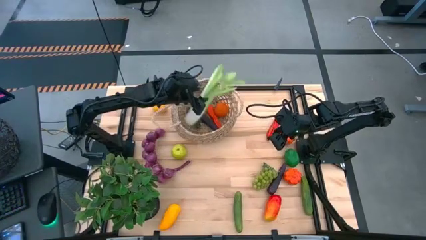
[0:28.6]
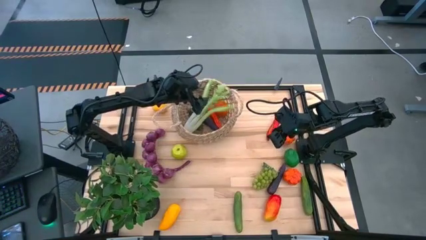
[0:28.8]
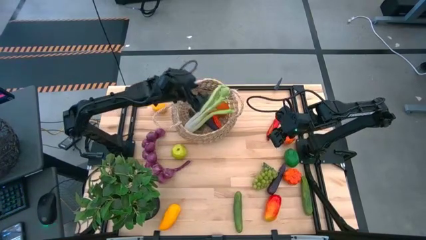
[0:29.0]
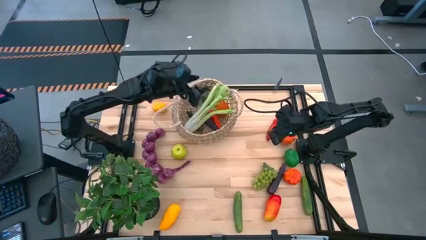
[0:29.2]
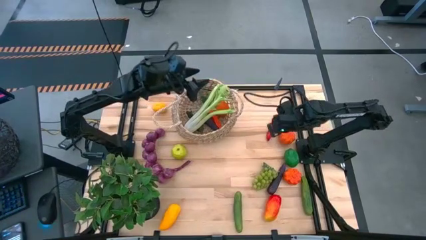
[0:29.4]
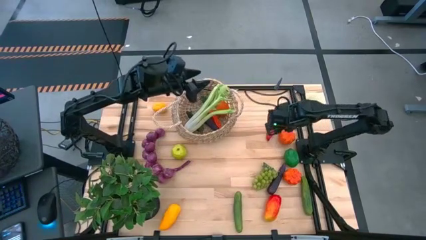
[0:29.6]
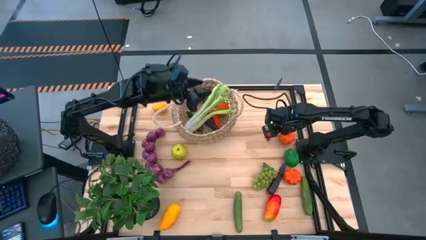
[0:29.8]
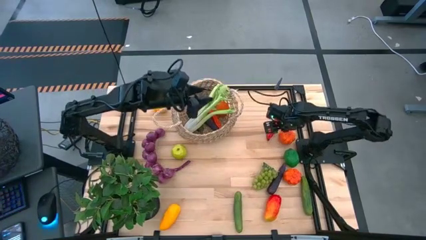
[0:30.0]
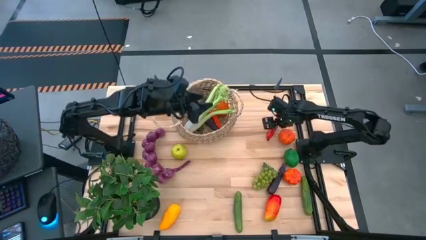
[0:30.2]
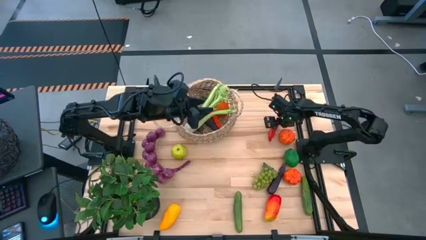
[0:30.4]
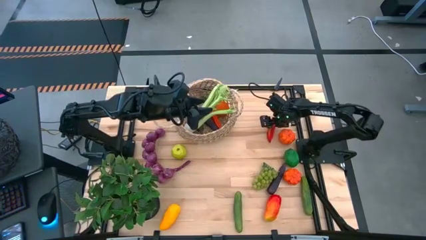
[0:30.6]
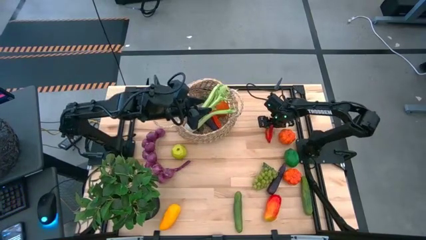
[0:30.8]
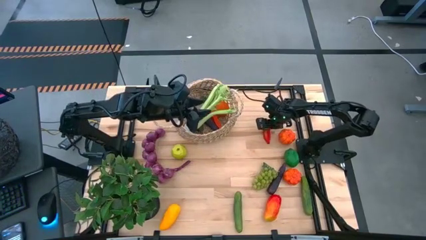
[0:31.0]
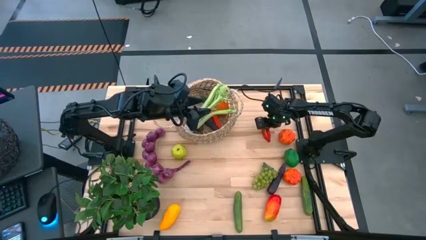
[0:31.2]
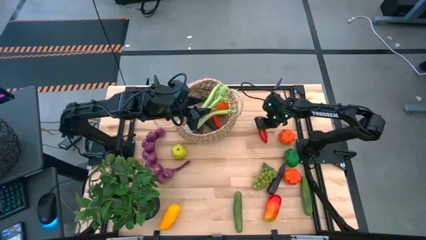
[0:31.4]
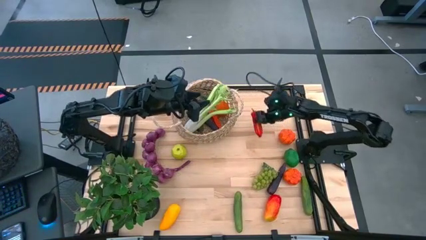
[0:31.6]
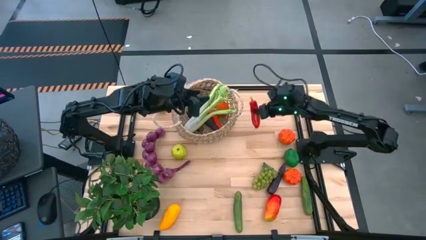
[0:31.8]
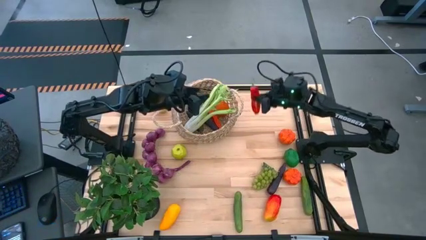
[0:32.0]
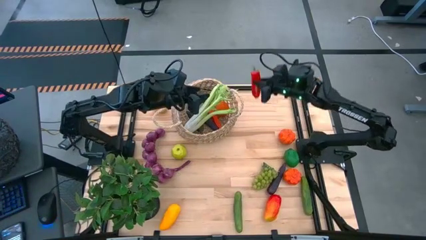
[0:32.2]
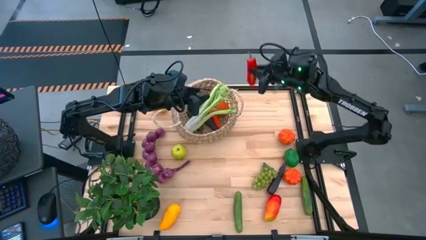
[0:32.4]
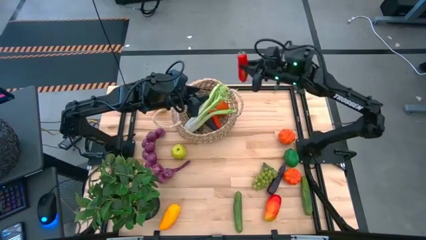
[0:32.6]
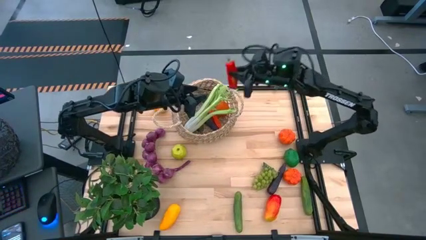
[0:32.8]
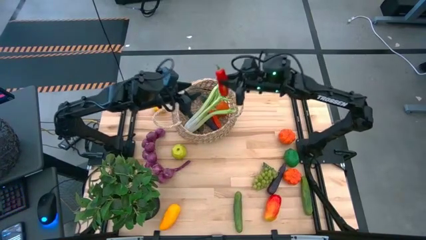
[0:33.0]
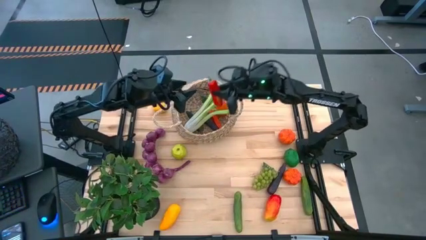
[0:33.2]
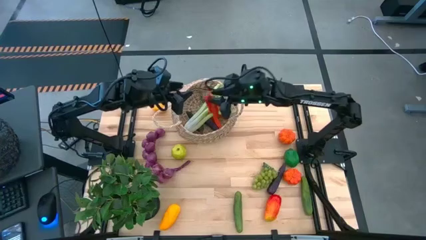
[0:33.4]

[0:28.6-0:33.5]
Task: Build produce basket
Put the red chili pepper into the brown basket

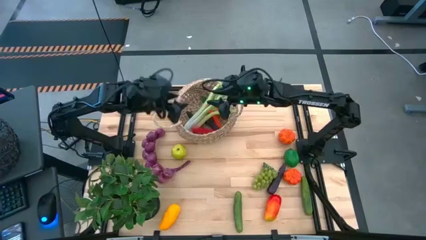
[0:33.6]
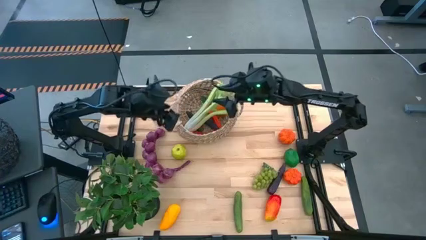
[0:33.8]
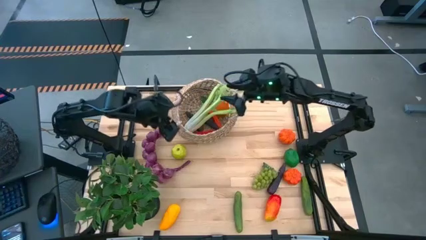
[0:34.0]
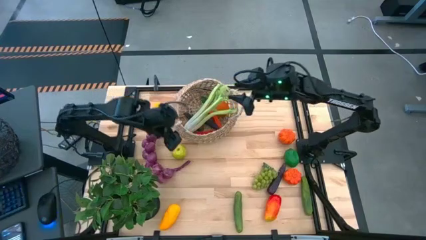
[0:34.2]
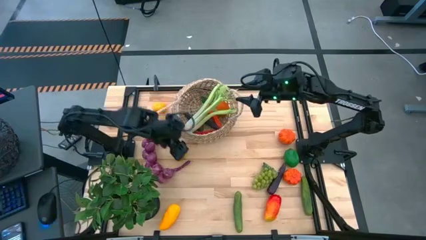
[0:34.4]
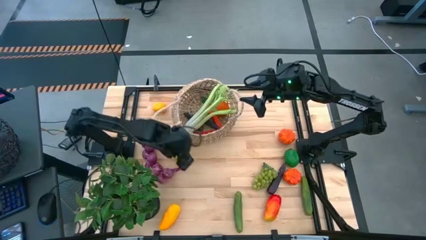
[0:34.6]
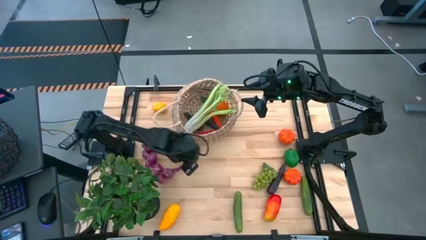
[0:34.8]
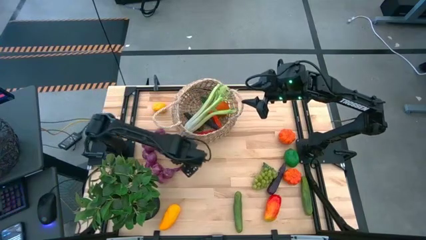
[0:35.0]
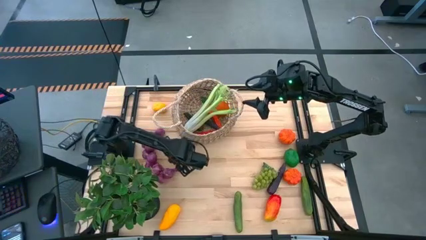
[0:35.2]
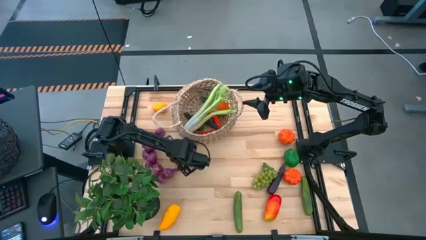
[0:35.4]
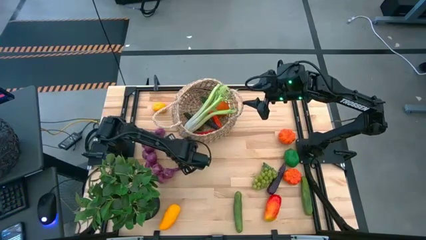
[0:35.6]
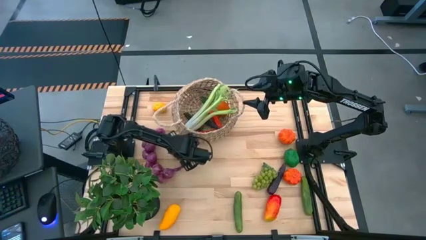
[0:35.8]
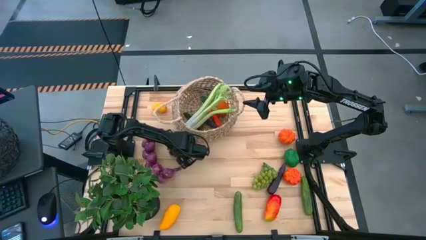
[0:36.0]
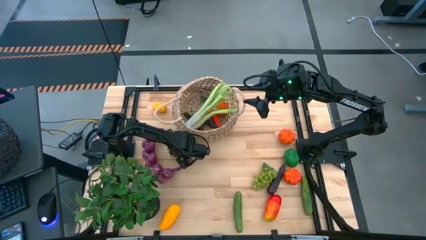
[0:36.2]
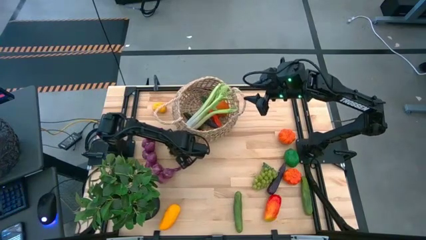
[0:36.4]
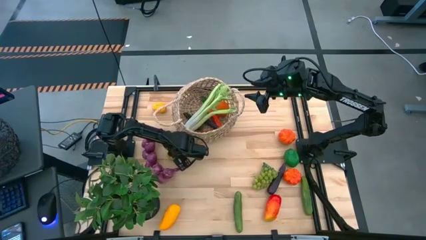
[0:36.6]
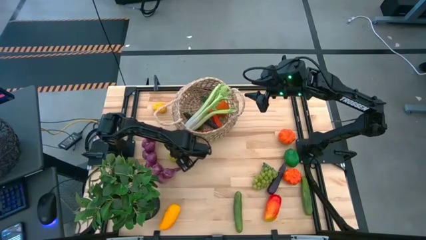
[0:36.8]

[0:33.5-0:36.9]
Put the green apple into the brown basket

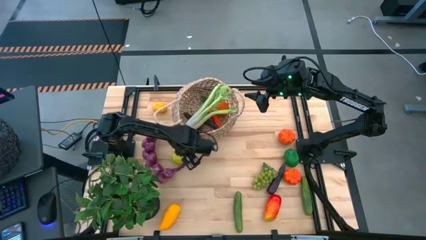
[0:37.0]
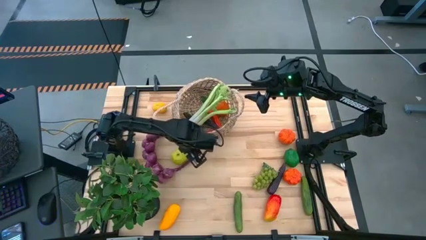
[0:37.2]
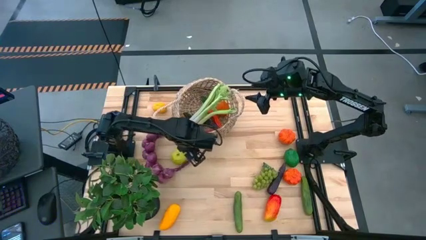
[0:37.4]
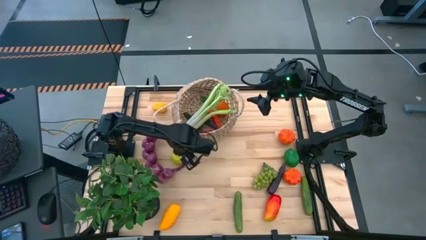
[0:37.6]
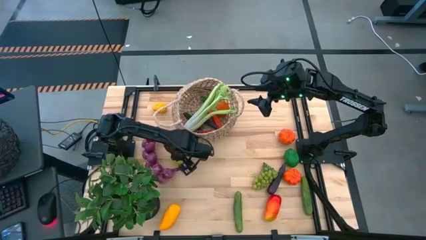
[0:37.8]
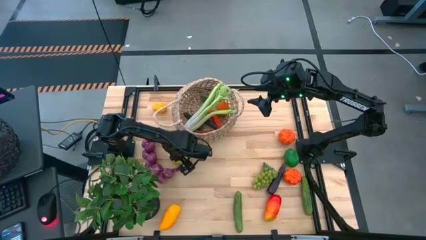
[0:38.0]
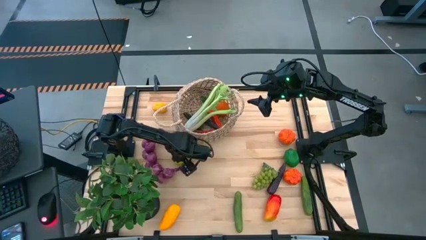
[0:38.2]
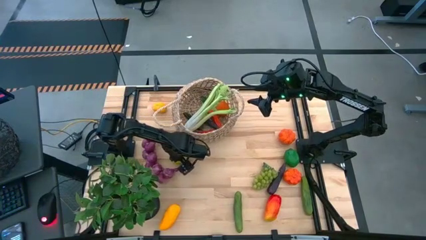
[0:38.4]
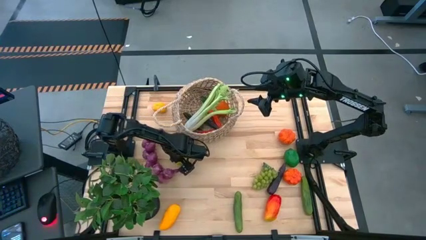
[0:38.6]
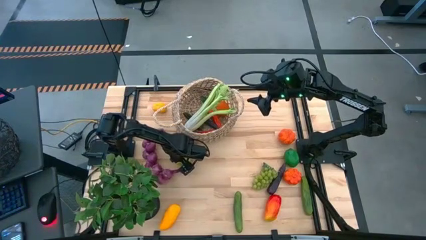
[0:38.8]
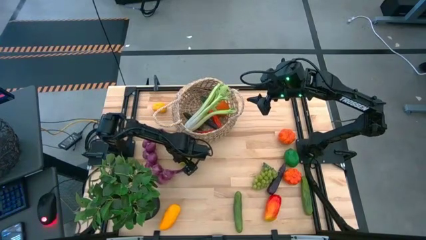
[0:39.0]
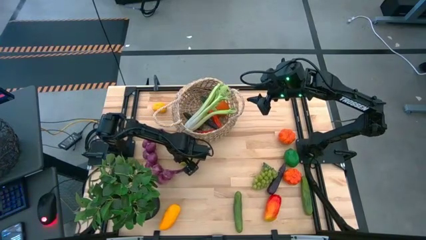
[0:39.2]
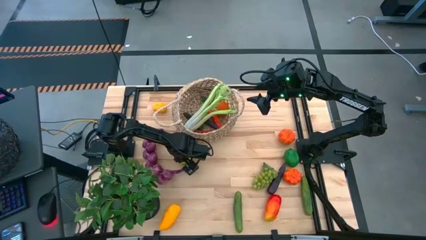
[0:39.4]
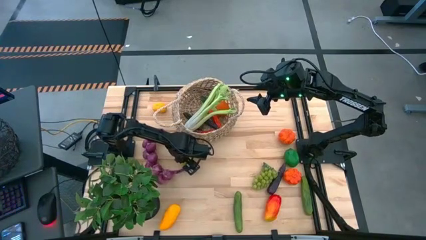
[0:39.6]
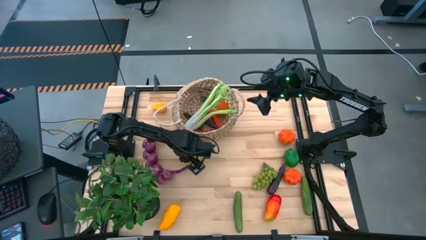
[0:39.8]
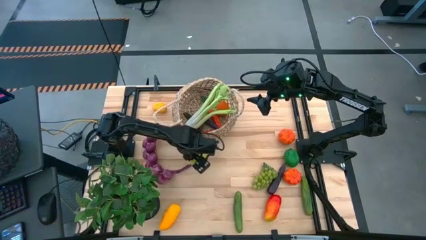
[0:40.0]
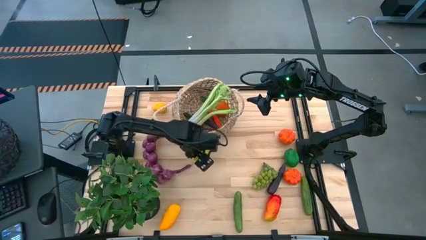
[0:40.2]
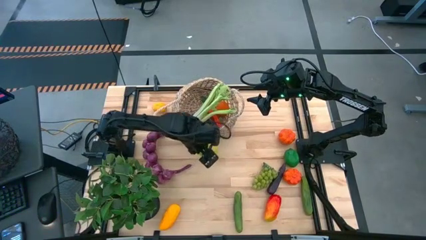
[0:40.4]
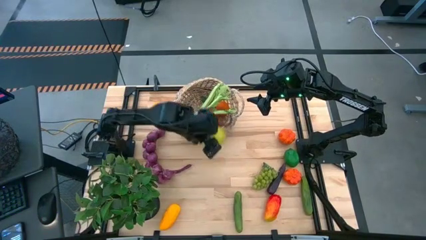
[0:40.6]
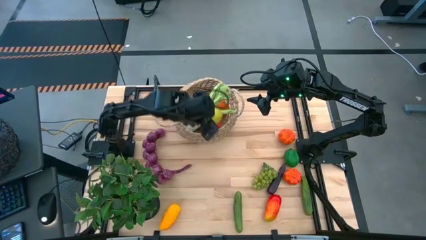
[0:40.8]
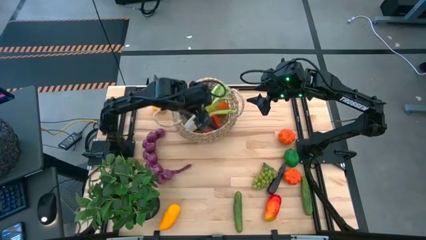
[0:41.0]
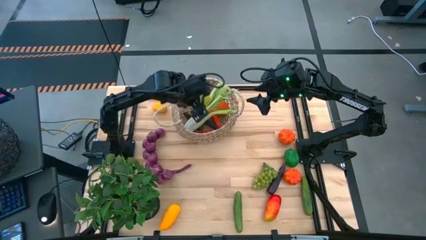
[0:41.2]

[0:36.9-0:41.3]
Put the green apple into the brown basket

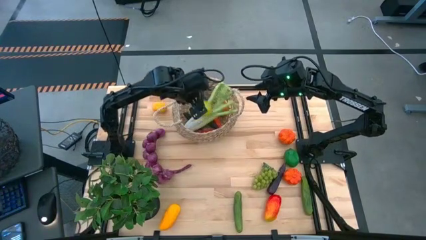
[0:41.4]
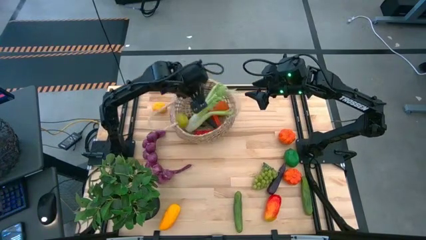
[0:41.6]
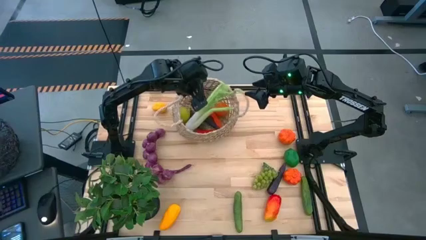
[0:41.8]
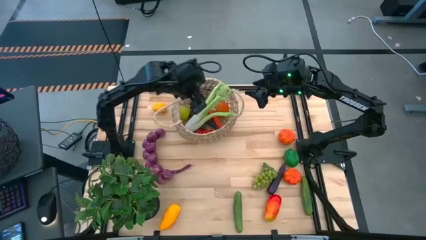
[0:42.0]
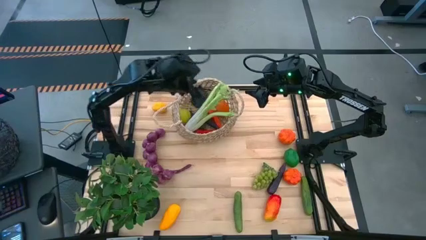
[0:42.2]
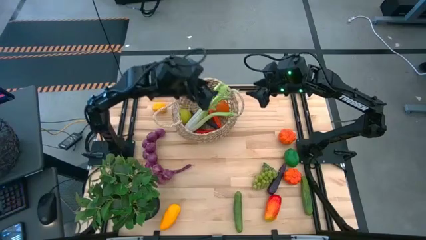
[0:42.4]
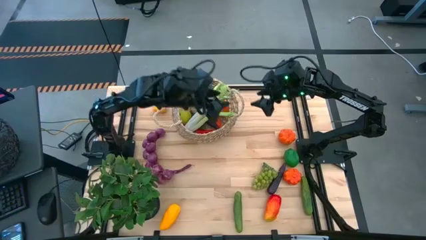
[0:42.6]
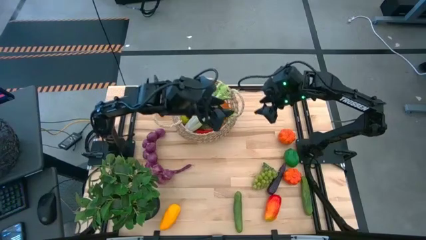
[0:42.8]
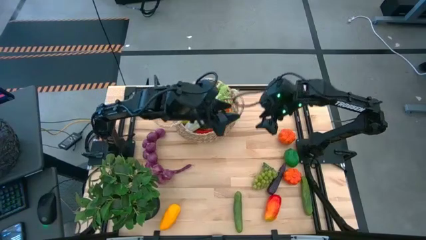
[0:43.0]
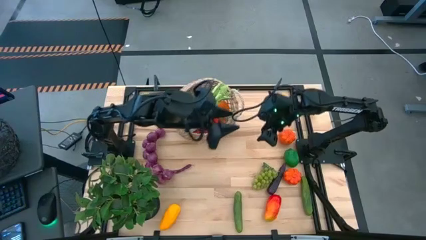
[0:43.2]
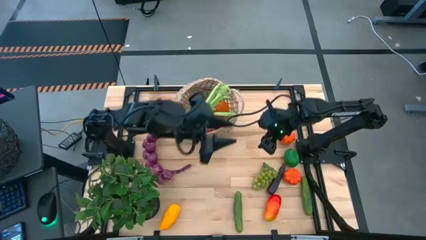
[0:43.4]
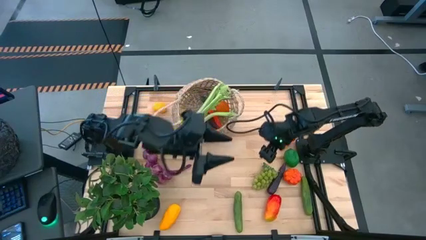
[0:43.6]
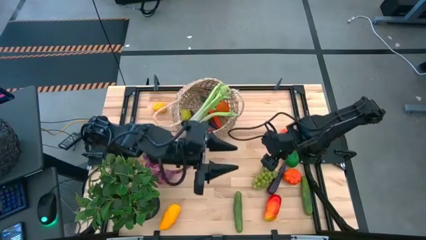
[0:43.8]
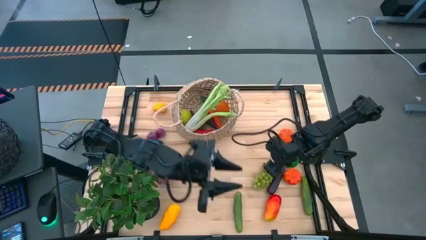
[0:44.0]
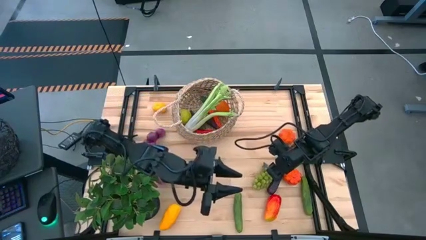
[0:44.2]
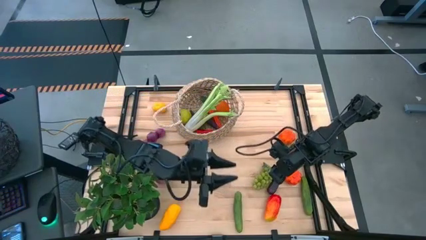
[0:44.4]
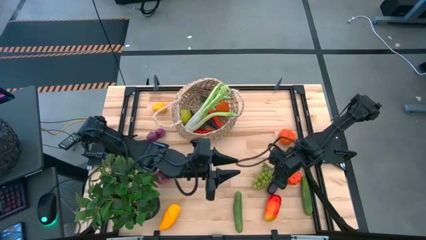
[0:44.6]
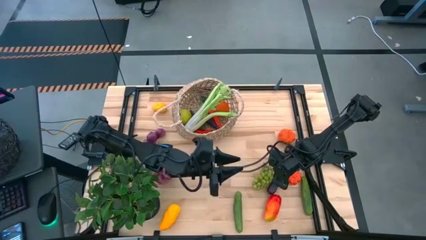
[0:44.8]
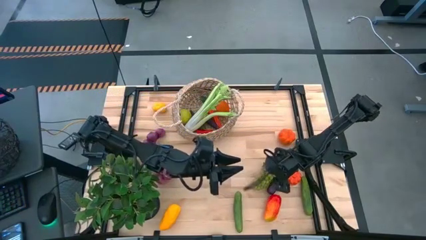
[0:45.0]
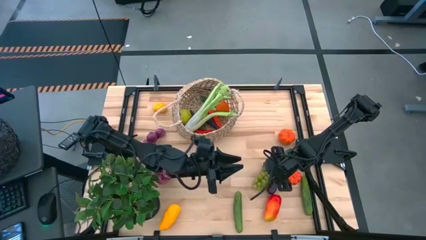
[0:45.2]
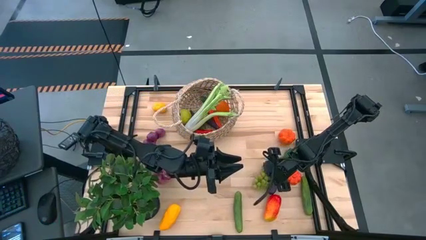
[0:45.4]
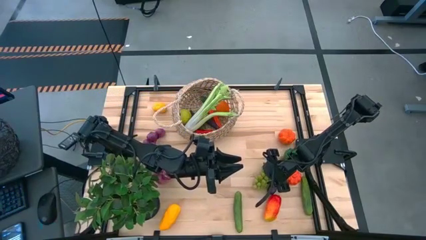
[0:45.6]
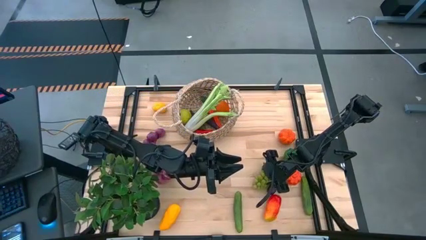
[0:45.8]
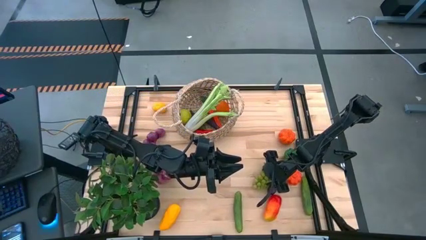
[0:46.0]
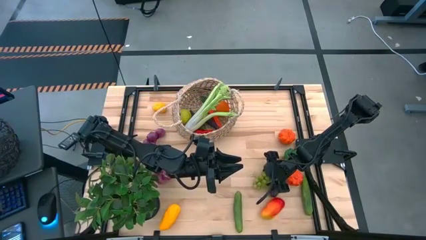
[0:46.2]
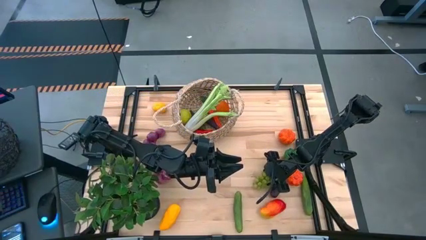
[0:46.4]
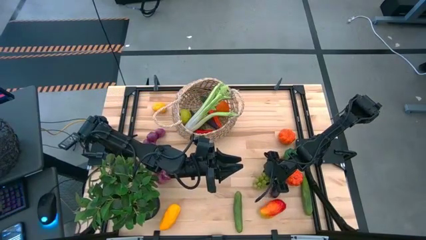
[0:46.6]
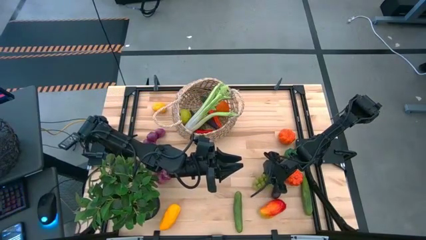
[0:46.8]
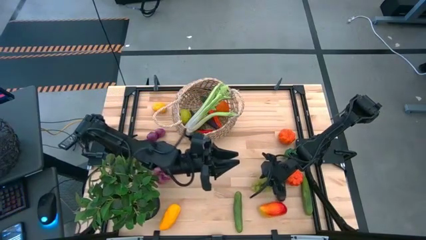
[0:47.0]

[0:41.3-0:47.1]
Put the green grapes into the brown basket
